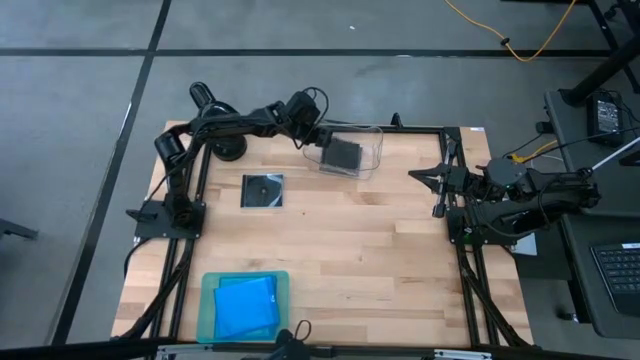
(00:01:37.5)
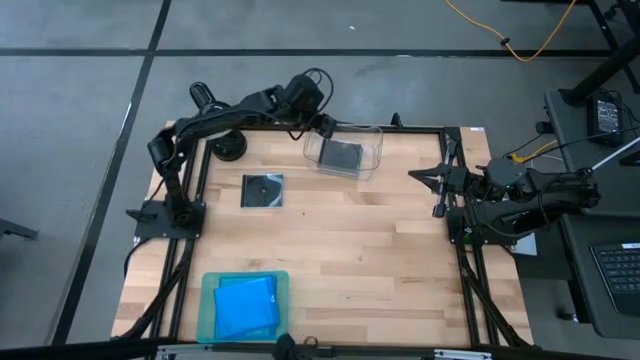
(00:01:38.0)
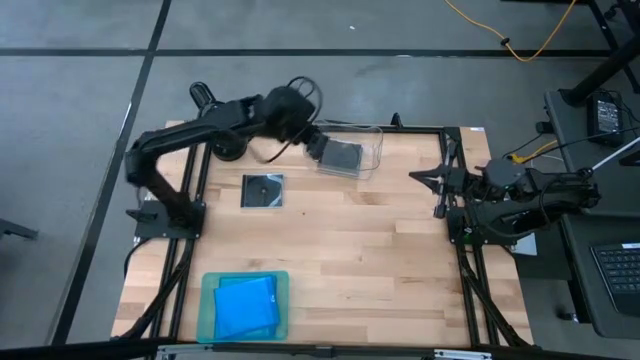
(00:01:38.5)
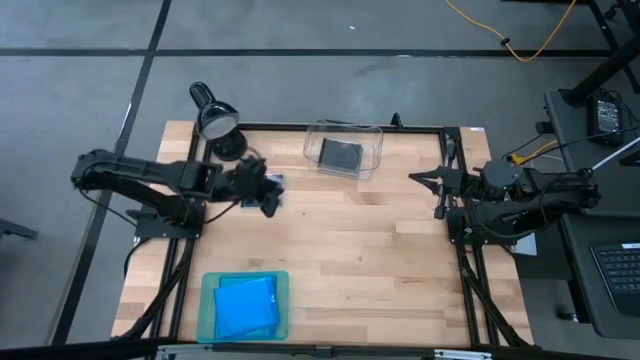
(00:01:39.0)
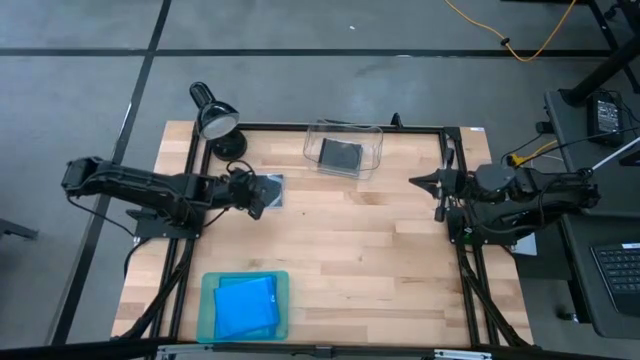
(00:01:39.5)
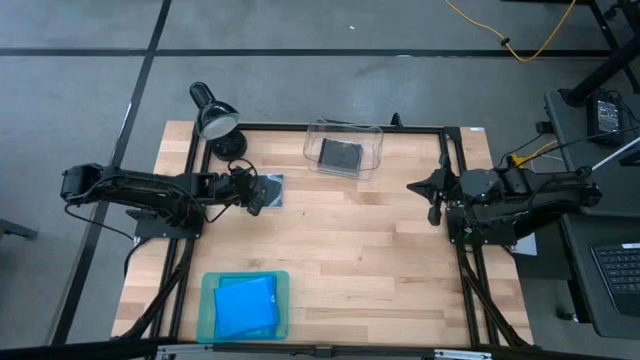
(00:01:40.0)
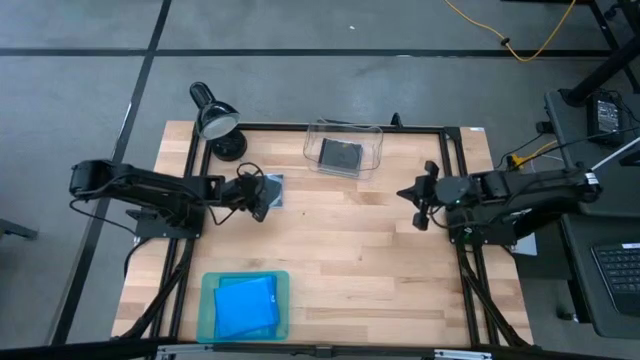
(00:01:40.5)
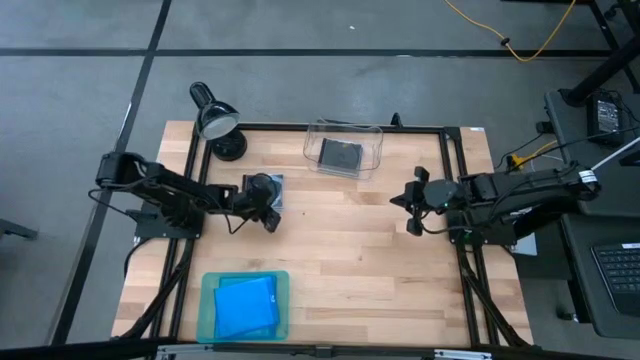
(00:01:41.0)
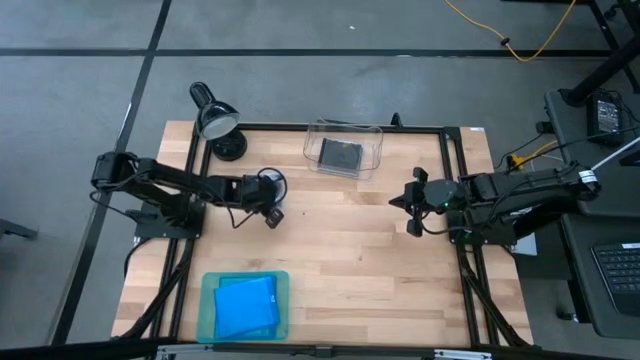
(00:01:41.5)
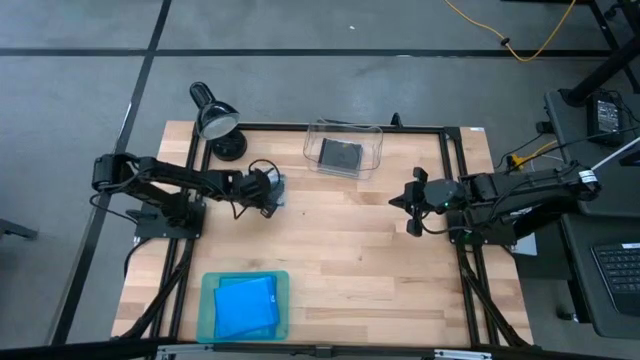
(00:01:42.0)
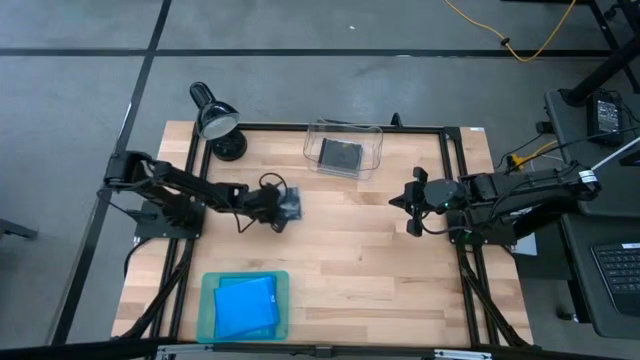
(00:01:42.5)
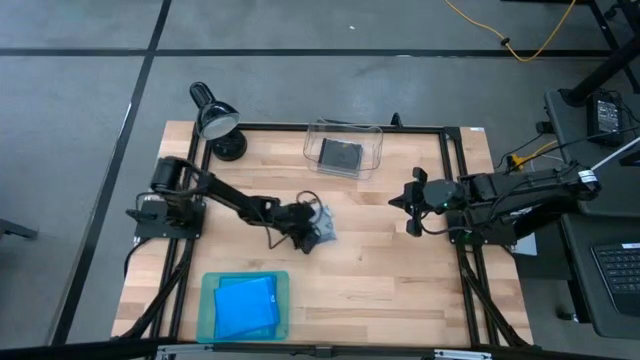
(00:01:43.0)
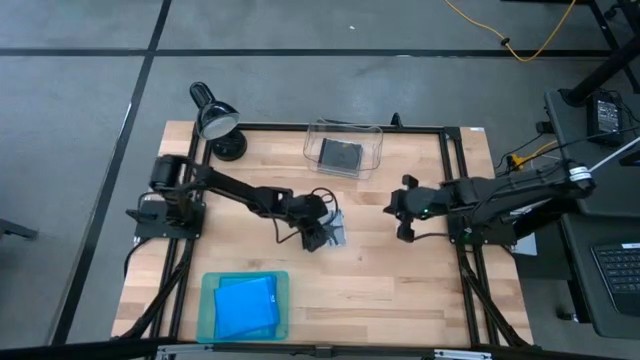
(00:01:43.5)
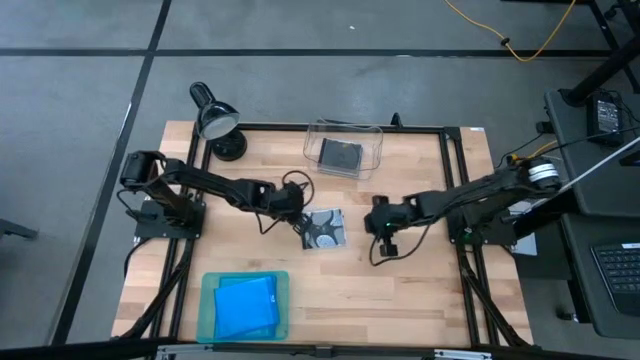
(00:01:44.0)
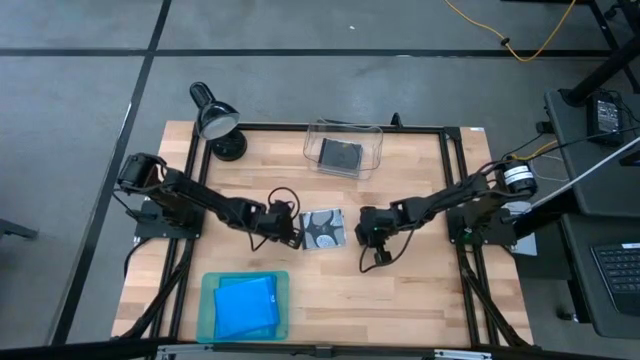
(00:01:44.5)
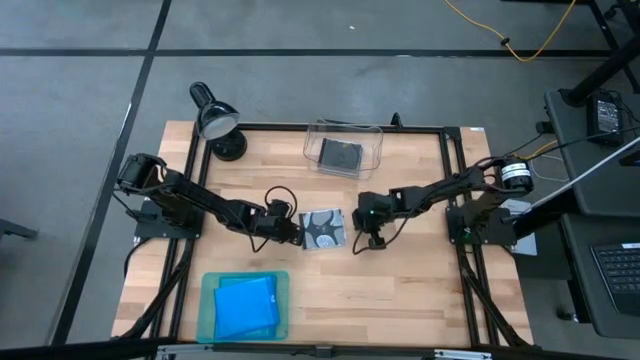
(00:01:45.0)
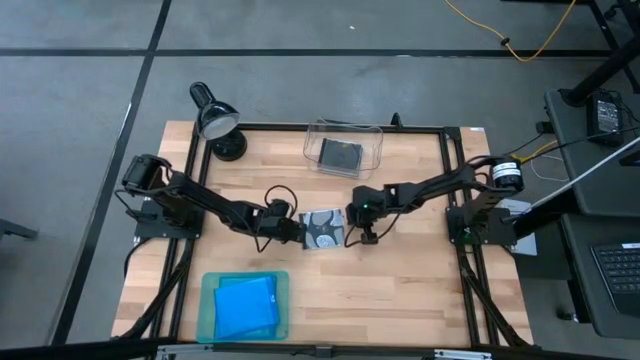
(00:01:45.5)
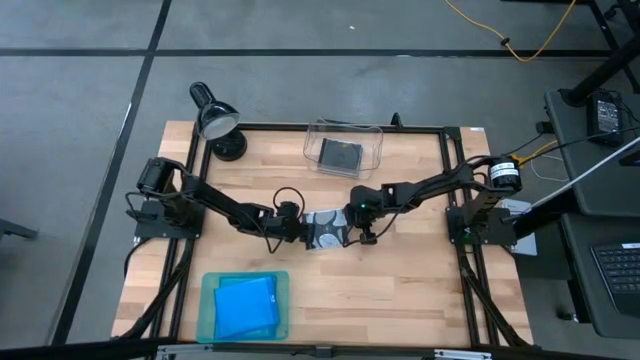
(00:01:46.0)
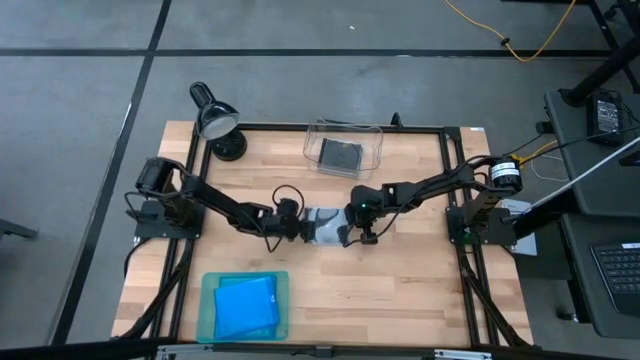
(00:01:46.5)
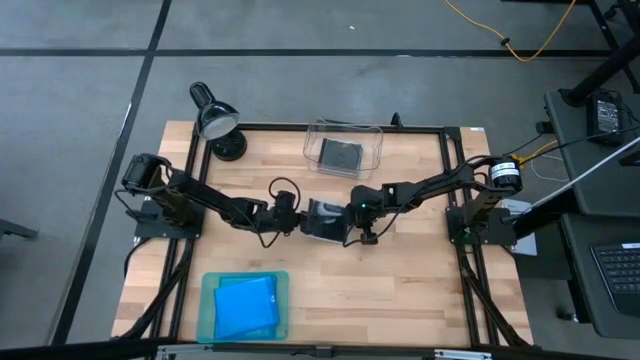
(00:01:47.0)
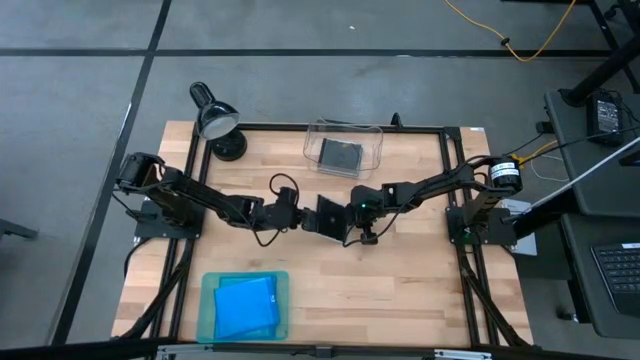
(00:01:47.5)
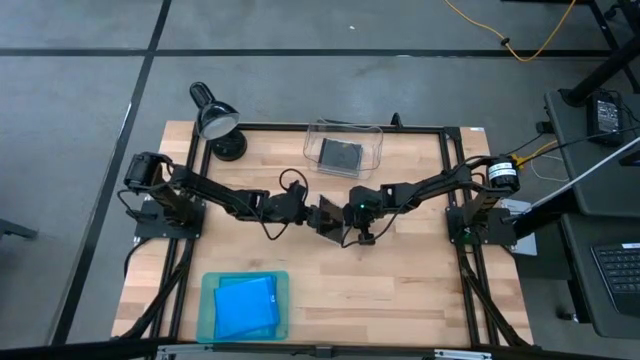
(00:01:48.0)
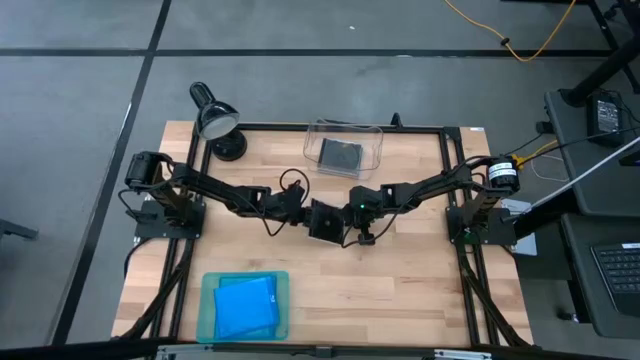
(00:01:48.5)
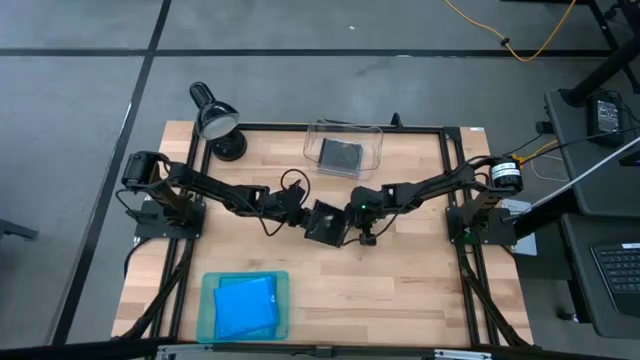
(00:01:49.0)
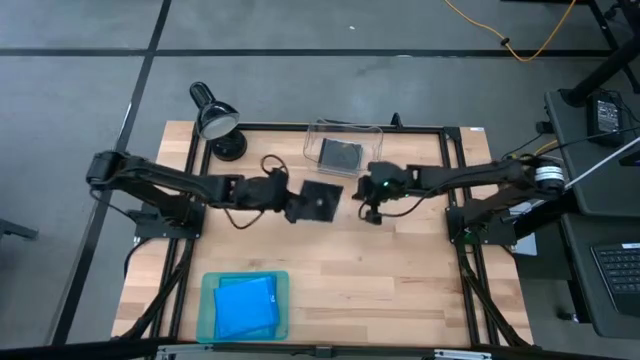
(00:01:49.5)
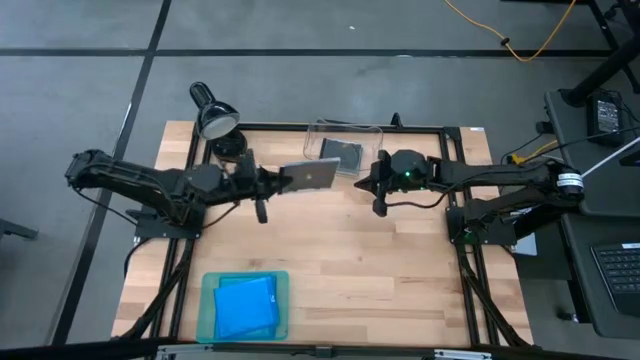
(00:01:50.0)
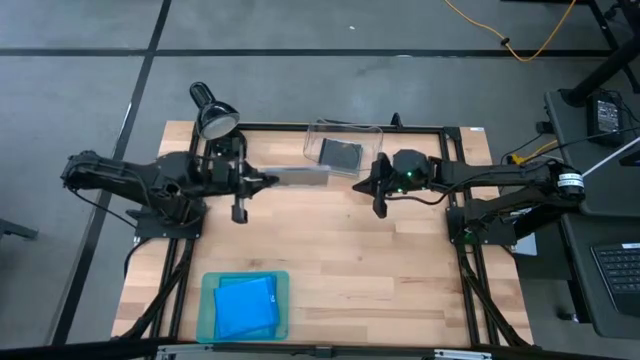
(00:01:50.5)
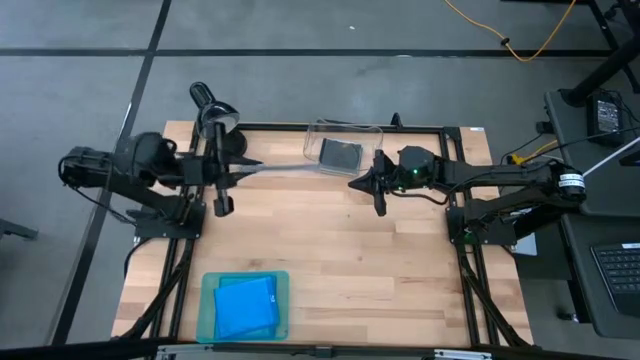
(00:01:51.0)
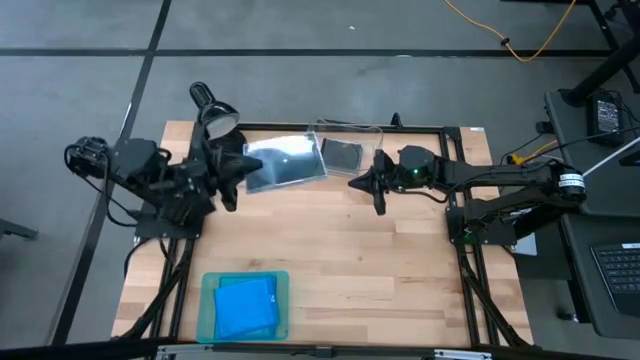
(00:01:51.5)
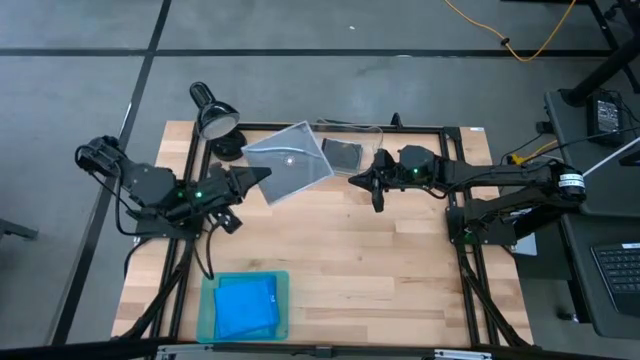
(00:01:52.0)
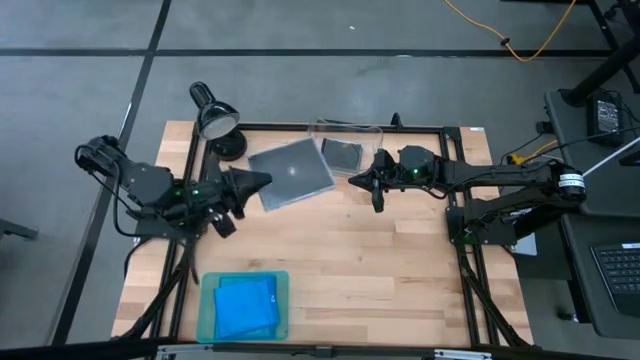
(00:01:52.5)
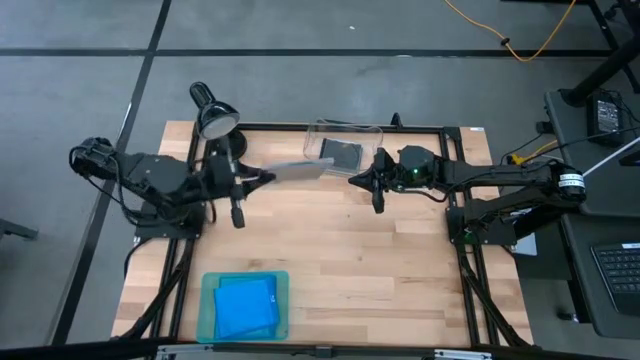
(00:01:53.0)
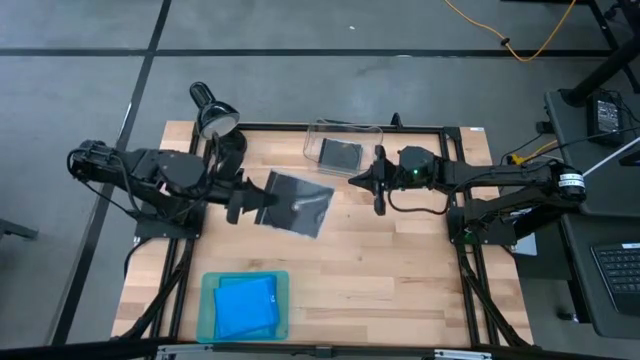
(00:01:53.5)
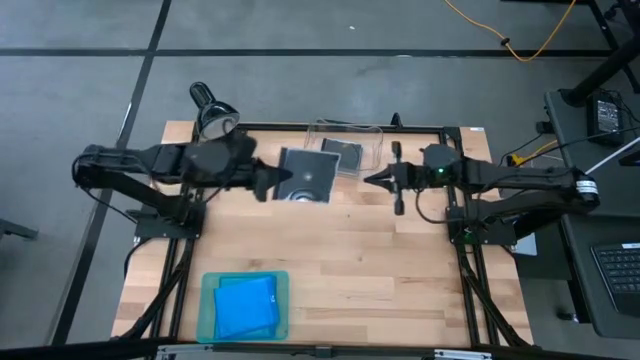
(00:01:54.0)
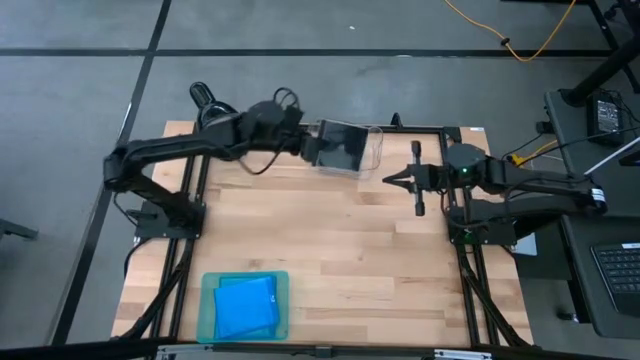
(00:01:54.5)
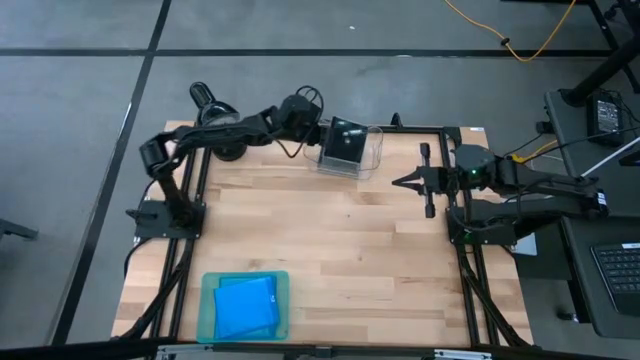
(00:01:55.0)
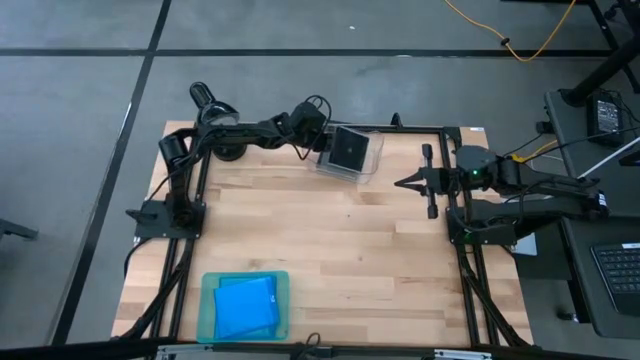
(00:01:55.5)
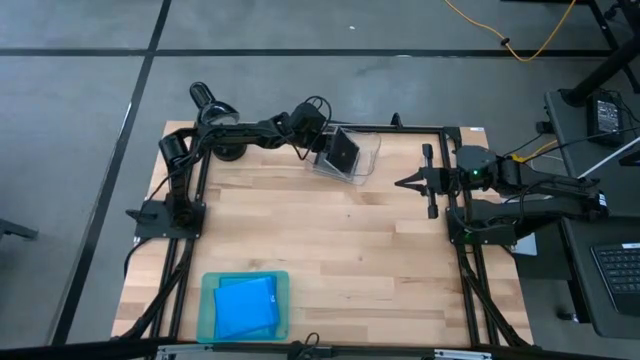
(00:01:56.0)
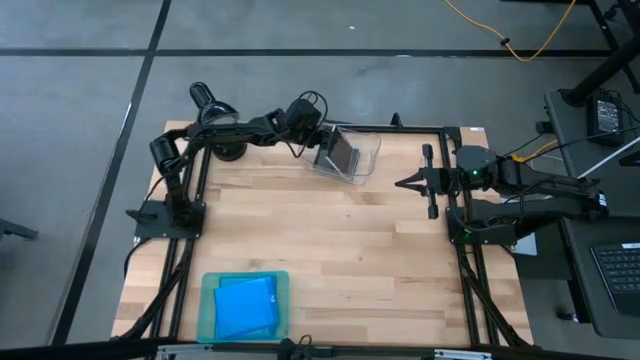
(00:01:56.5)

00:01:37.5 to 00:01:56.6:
Task: Pick & place jewel cases by type
Put the black CD case into the transparent bin

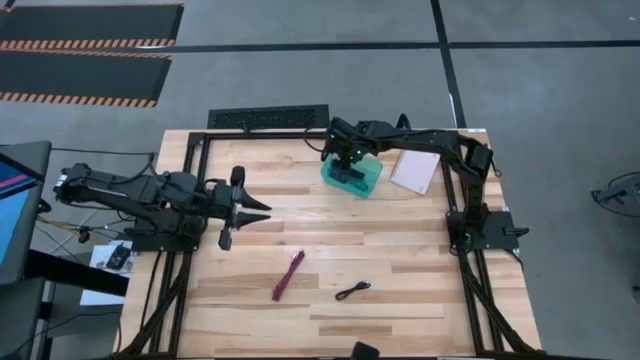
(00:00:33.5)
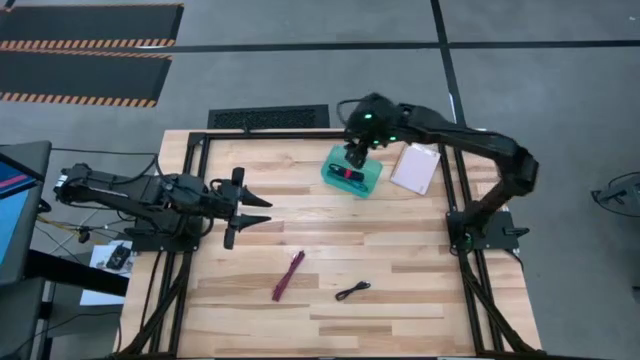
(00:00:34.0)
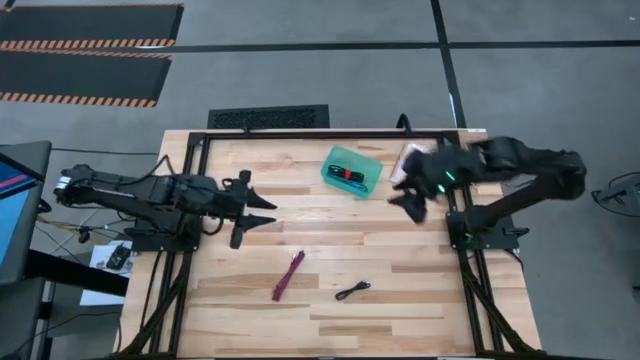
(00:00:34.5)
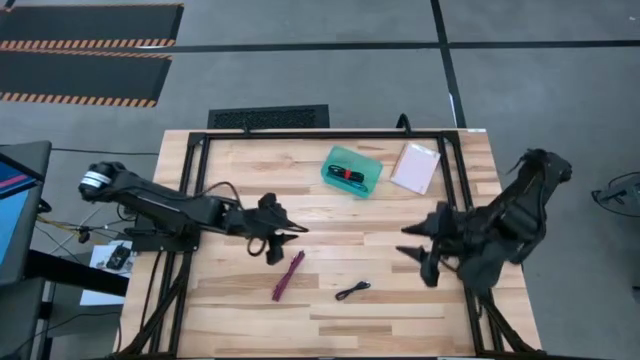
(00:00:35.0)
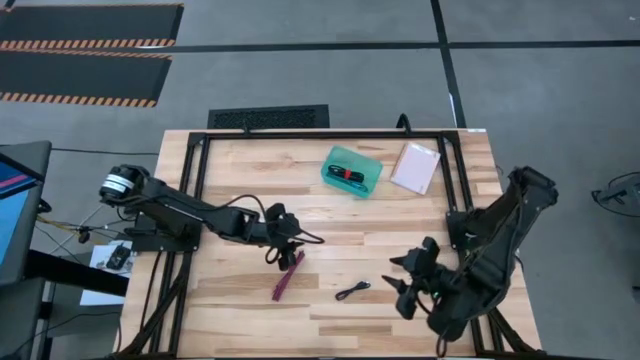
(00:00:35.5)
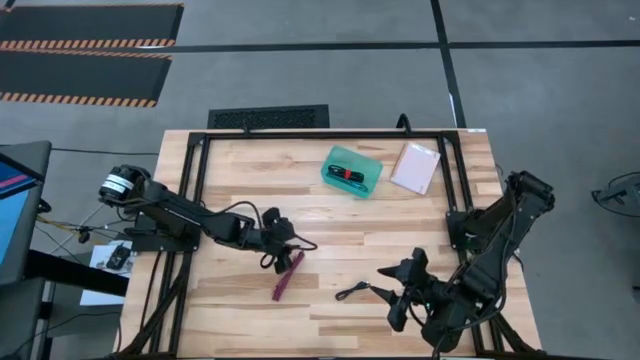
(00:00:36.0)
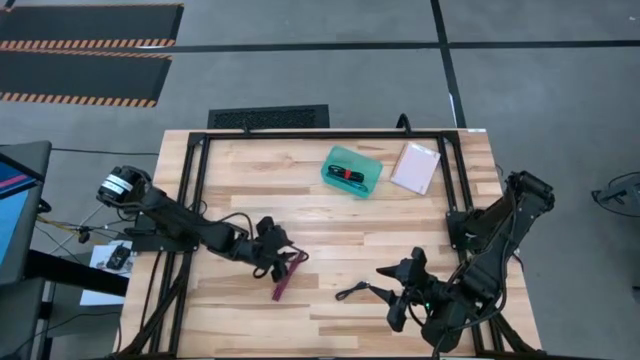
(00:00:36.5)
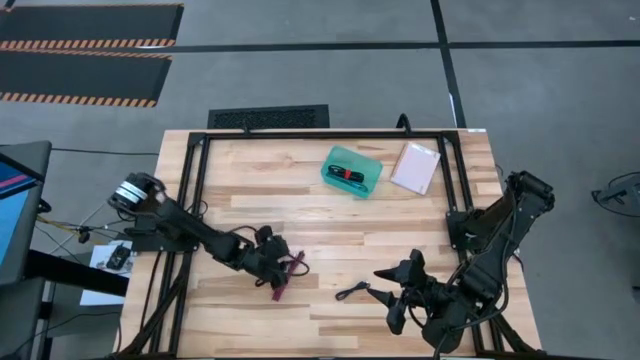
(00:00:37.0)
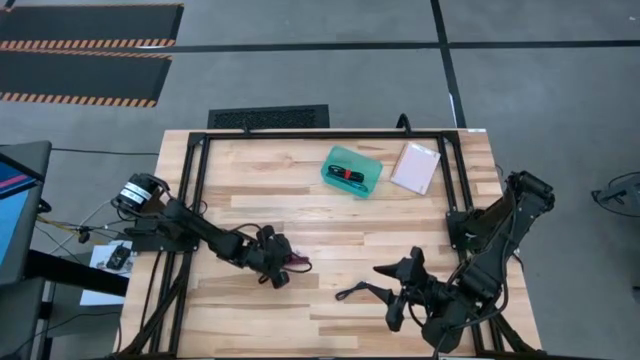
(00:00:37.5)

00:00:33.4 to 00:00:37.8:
Task: Pick and place USB-C Cables
Put the red charger cable into the light blue bin
